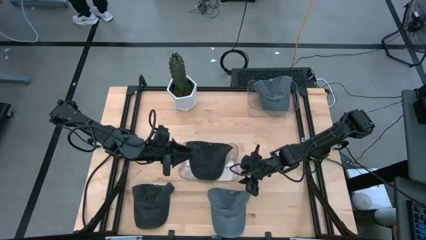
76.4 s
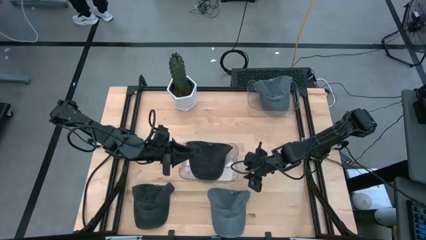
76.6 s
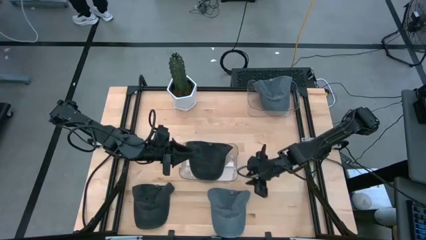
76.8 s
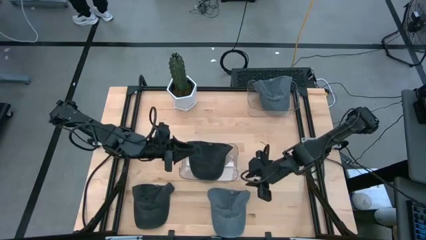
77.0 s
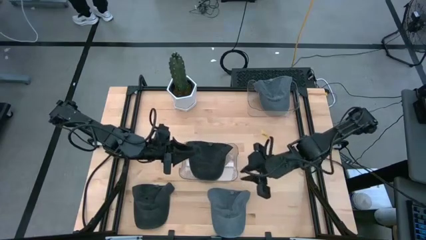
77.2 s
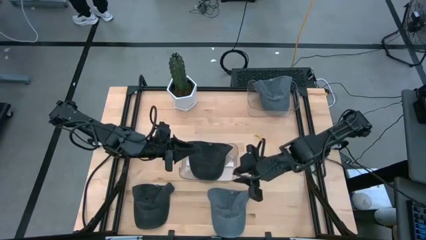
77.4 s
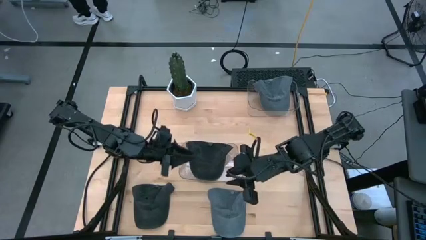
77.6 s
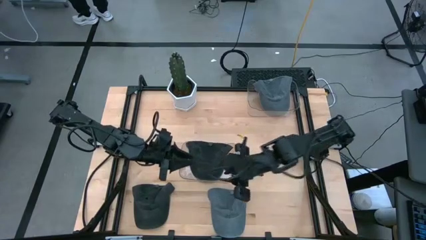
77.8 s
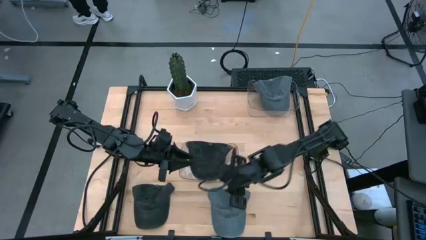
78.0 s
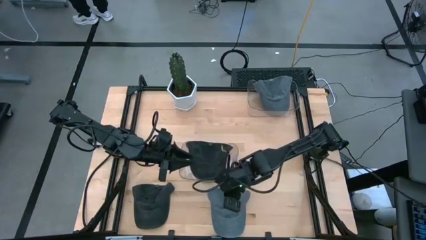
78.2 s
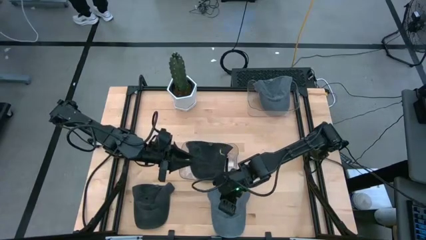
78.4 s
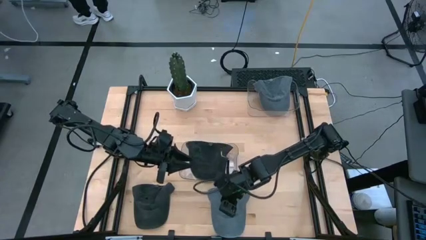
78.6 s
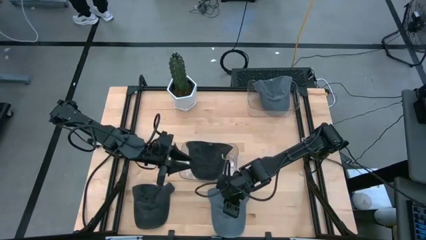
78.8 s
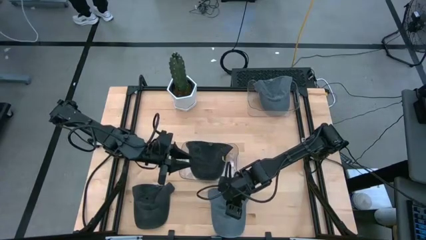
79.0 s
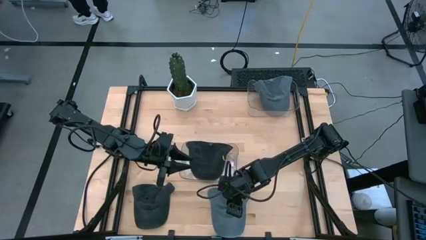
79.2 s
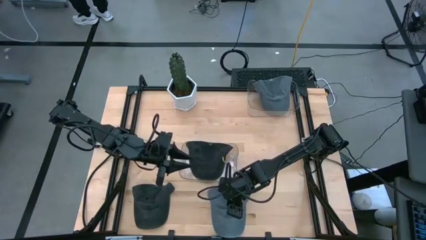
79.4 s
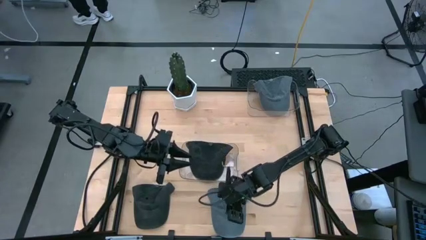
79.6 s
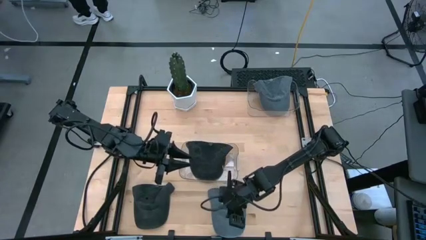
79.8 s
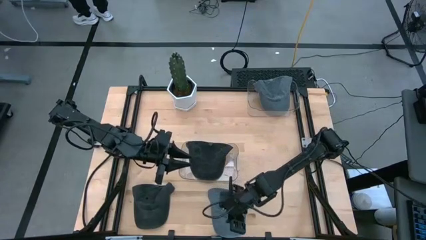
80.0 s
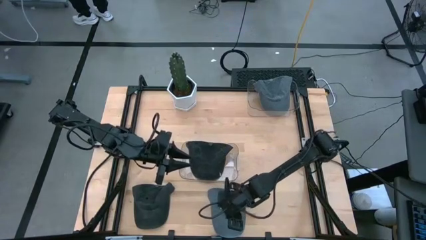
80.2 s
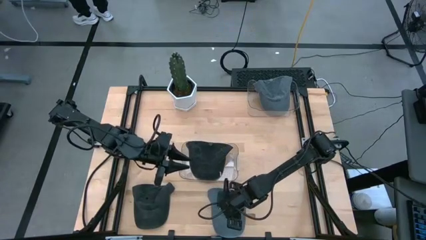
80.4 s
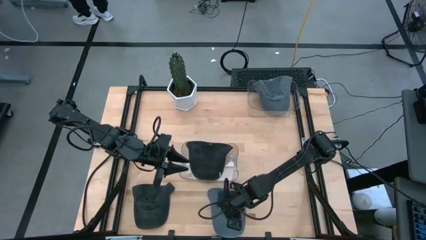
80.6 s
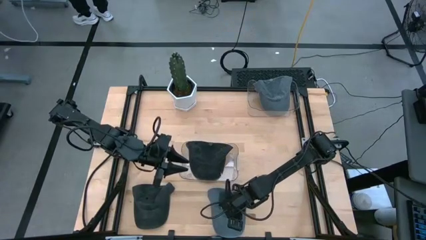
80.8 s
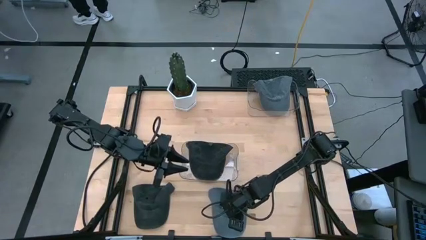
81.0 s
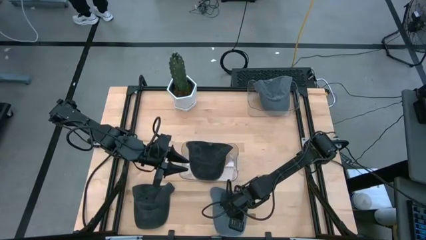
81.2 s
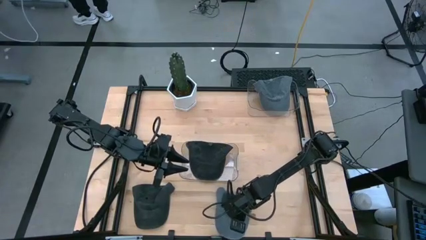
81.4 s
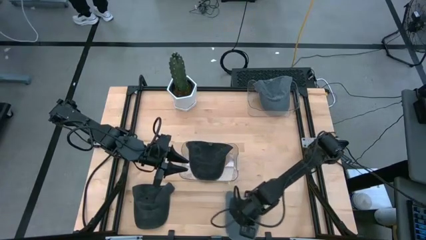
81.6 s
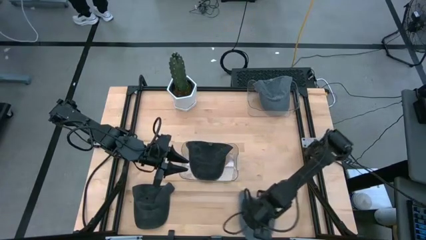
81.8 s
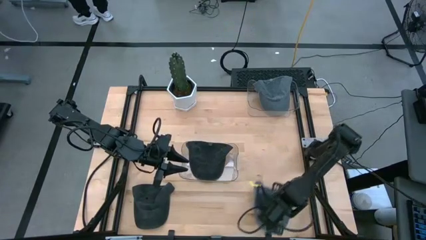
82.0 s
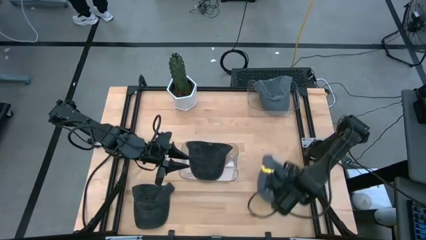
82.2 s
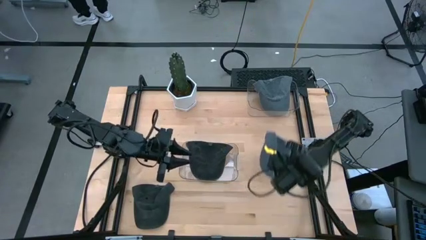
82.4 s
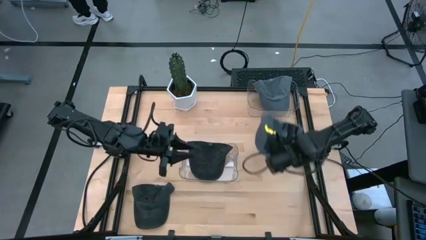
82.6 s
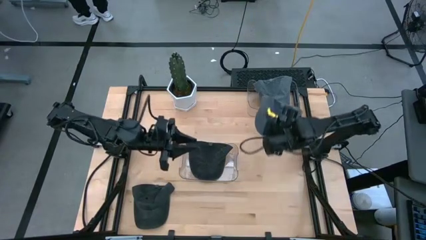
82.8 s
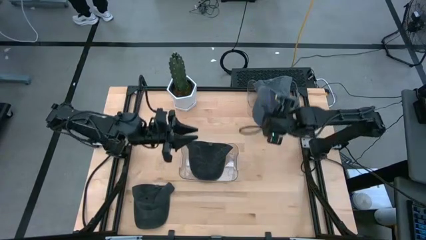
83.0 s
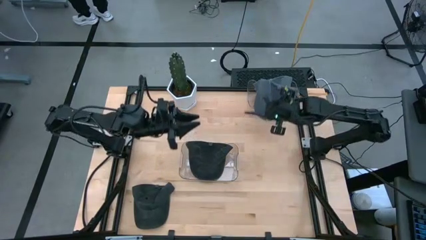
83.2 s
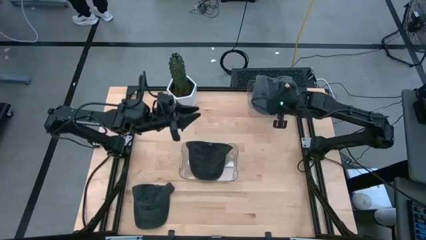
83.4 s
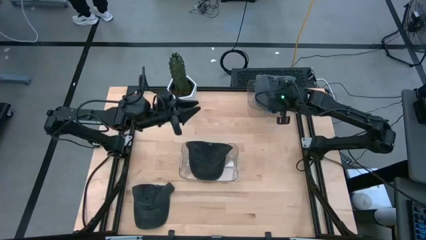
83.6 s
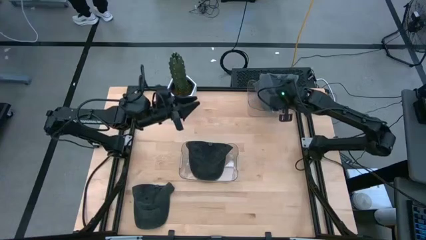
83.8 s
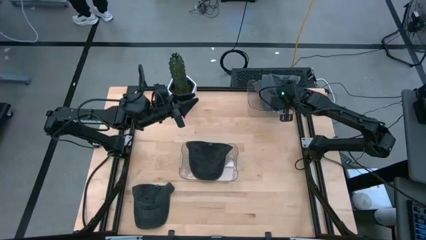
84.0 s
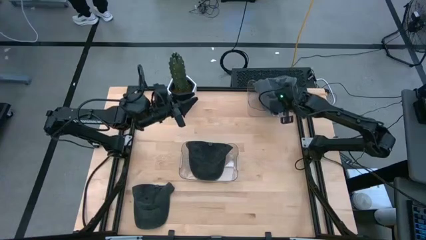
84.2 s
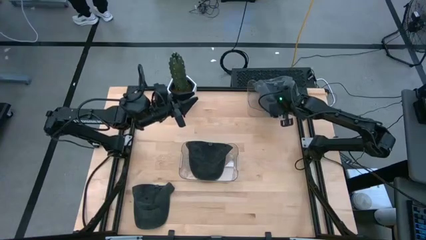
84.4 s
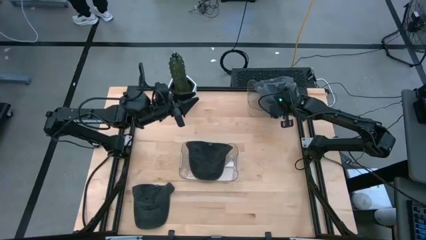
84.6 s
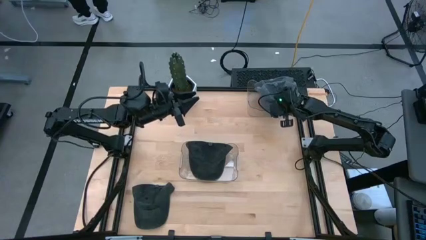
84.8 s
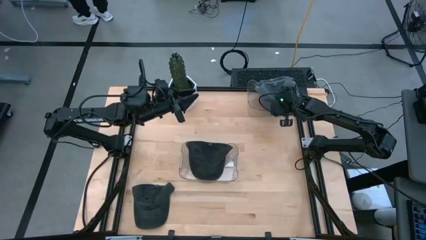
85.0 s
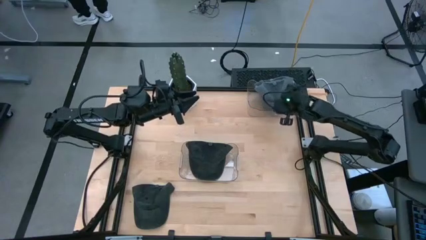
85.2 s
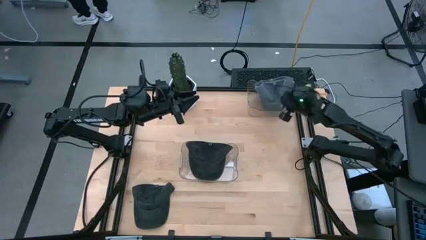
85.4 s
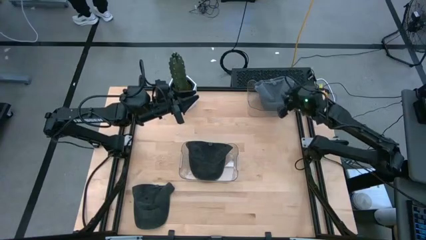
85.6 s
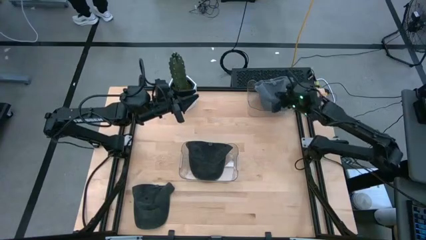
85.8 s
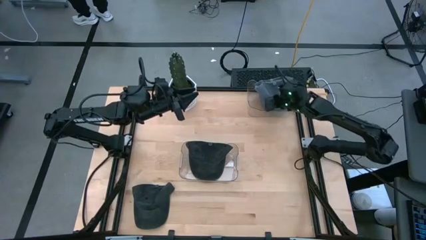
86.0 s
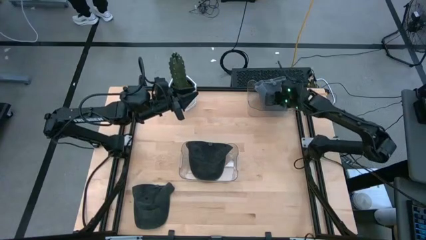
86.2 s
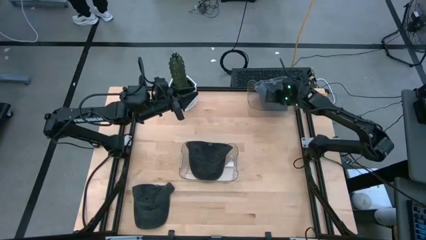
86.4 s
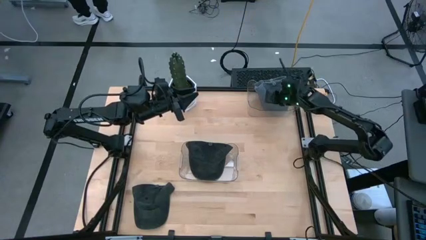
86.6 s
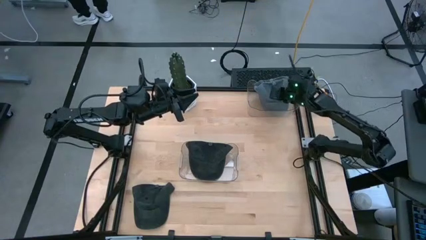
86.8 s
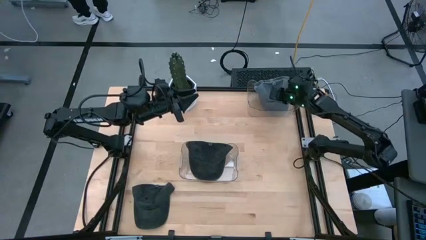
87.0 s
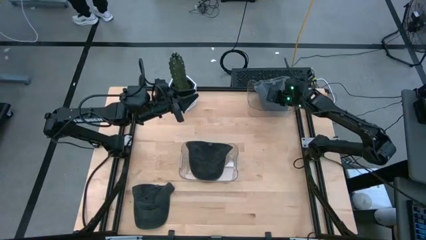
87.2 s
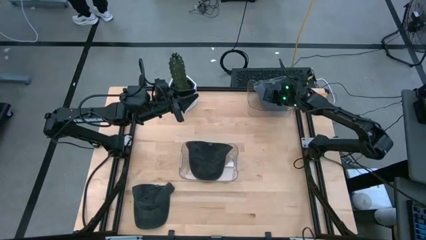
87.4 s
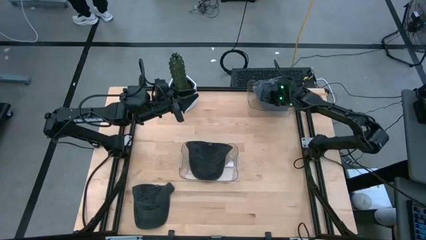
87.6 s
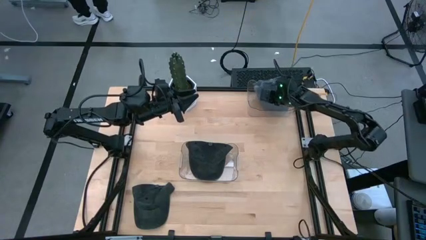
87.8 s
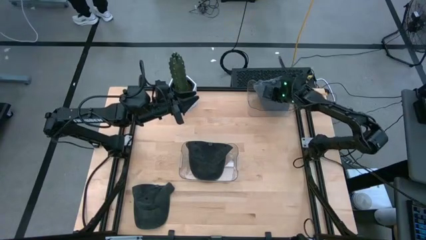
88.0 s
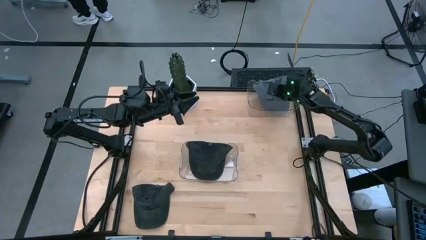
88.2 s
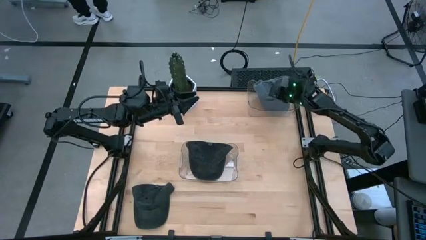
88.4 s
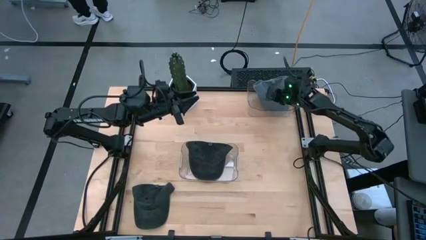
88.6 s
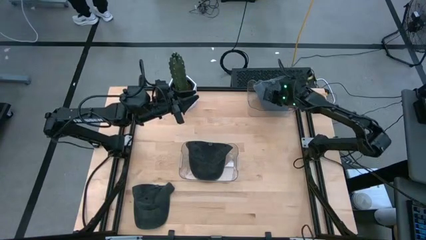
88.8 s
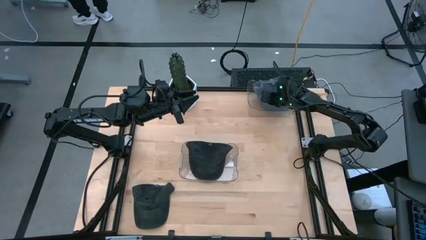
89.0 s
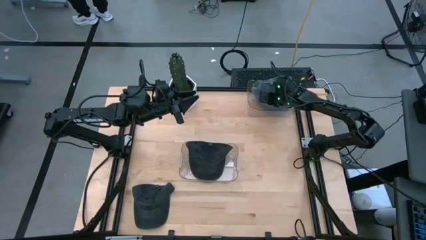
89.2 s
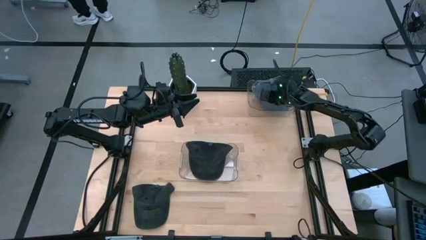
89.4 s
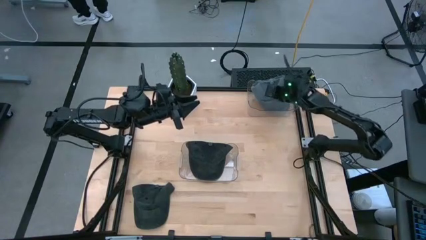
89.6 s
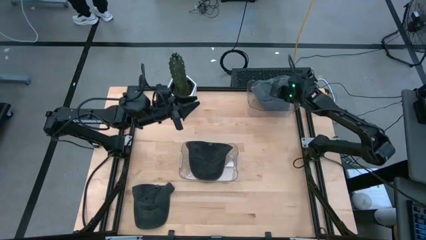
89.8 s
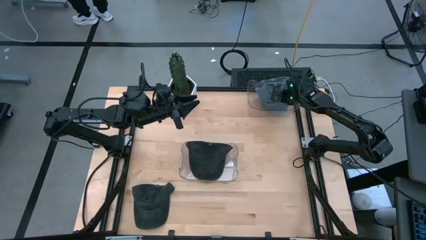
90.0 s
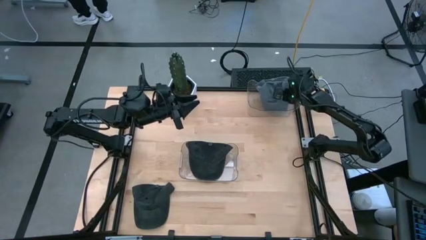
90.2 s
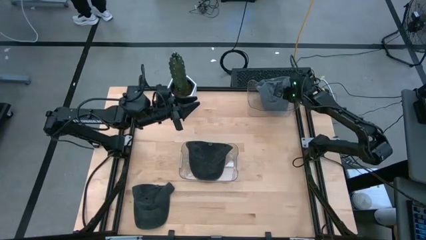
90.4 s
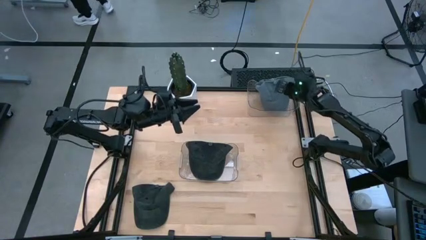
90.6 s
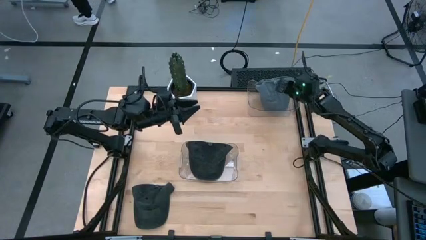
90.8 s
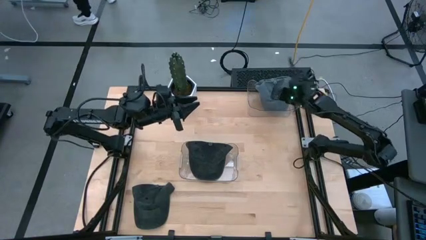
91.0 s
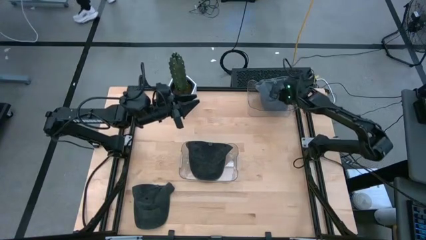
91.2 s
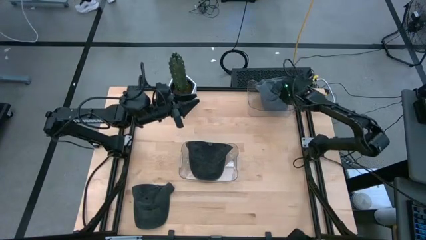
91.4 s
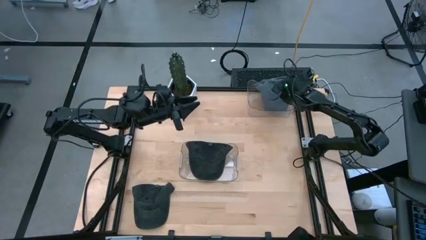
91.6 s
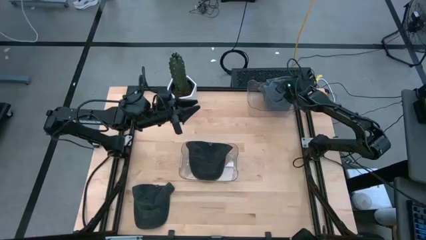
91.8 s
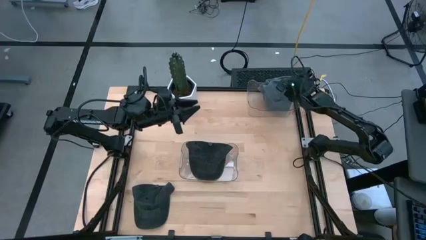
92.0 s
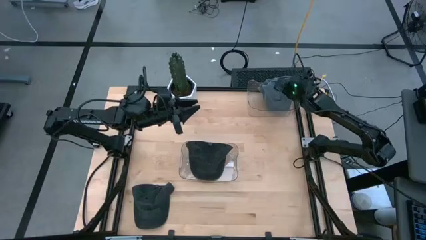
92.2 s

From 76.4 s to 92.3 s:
Task: Pick & Place hat
Put the gray cap into the top transparent bin

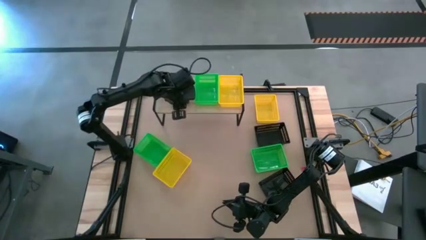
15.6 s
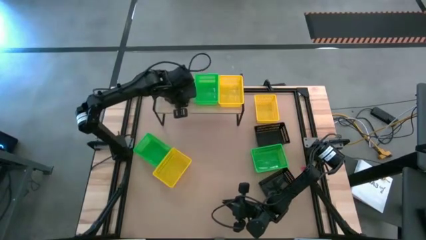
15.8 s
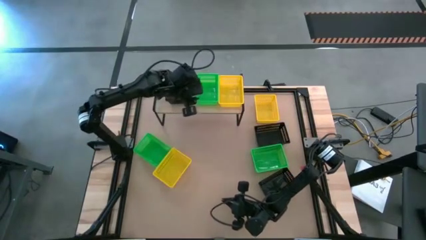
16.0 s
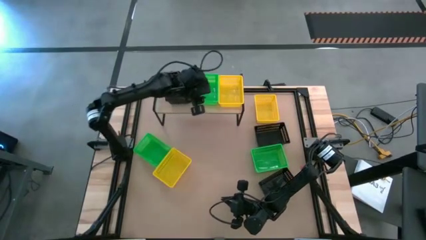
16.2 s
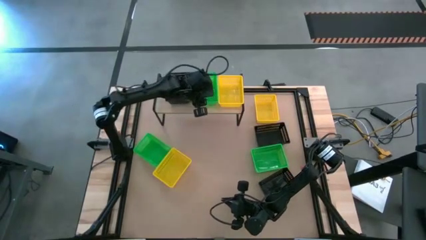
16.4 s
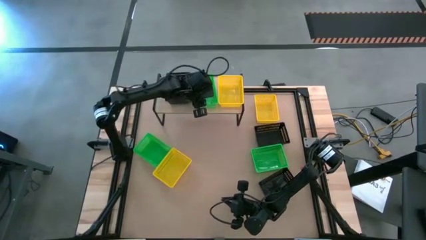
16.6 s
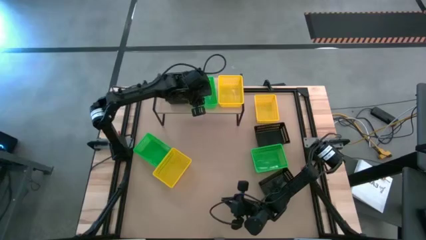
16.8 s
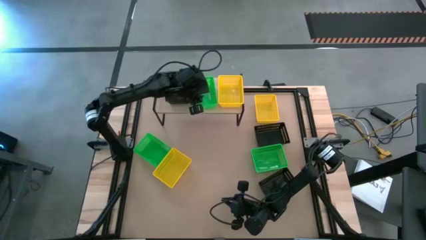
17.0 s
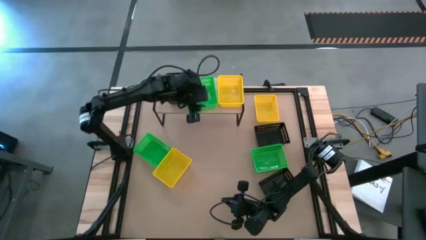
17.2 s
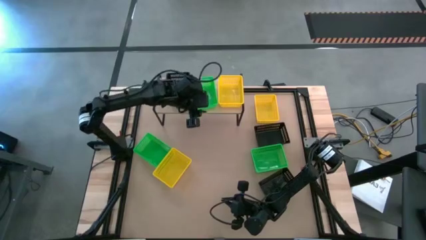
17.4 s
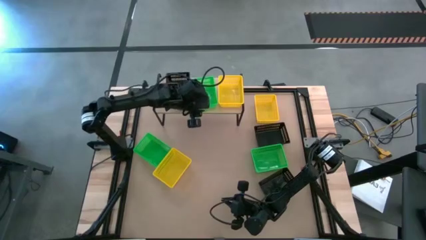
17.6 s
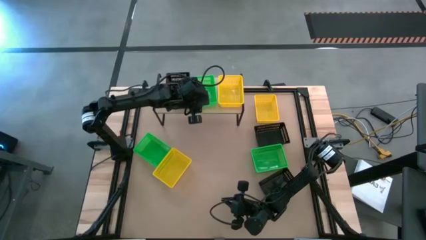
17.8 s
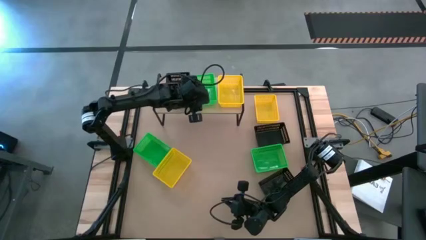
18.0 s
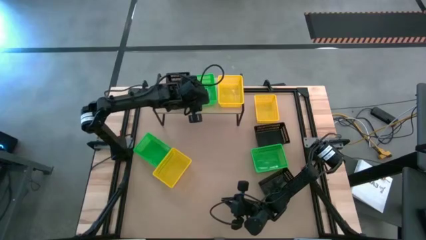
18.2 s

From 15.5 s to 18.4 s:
Task: Stack baskets on shelf by color
Adjust the green bin on the shelf
